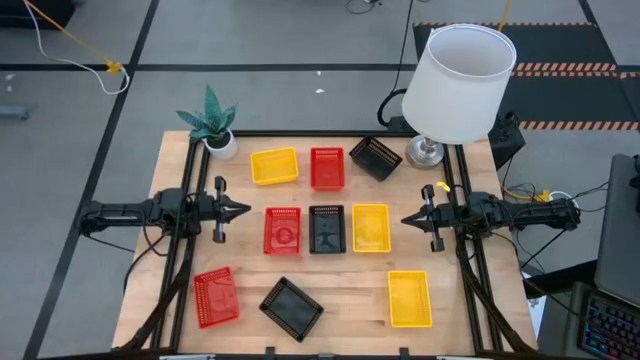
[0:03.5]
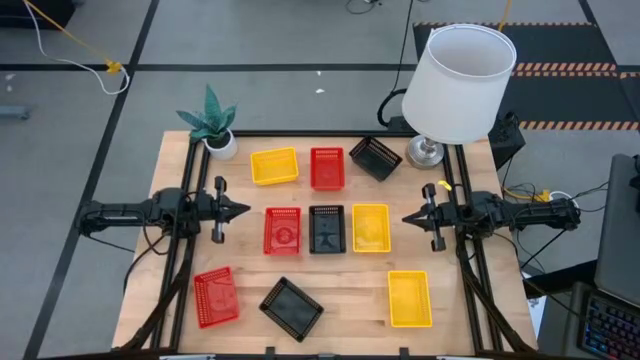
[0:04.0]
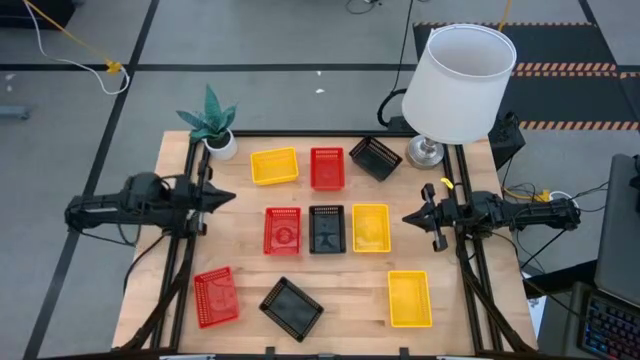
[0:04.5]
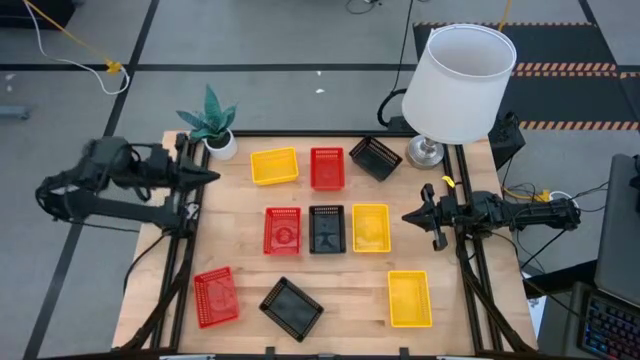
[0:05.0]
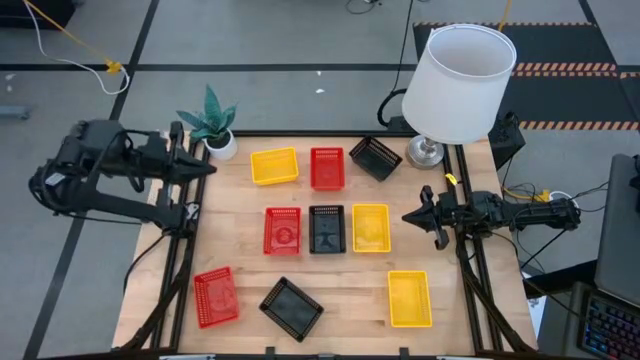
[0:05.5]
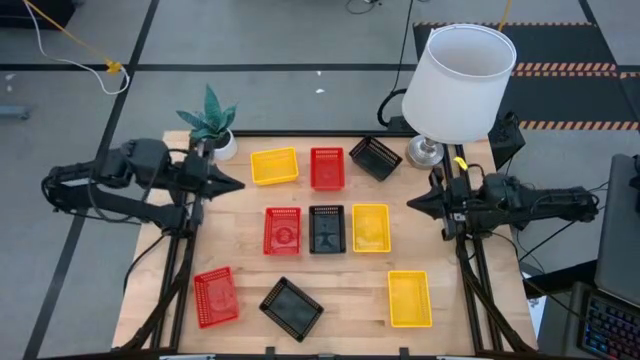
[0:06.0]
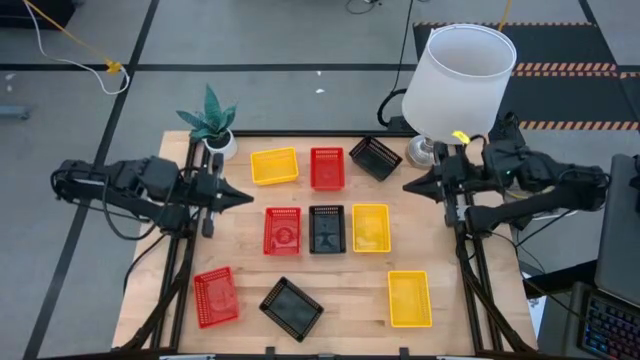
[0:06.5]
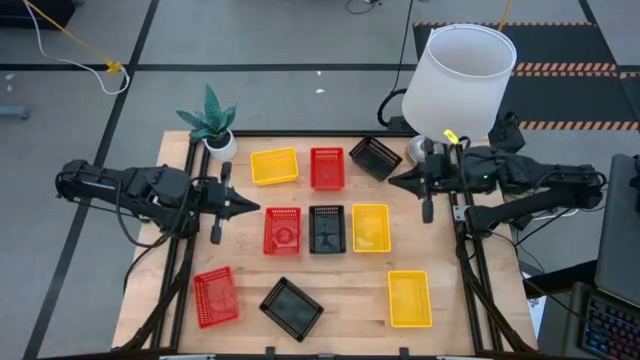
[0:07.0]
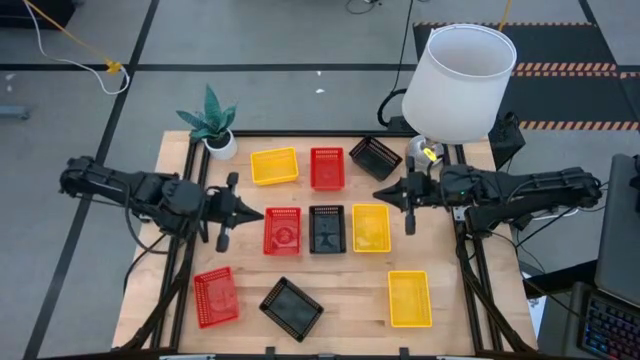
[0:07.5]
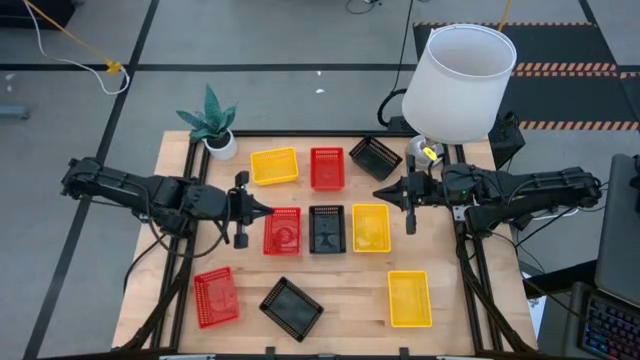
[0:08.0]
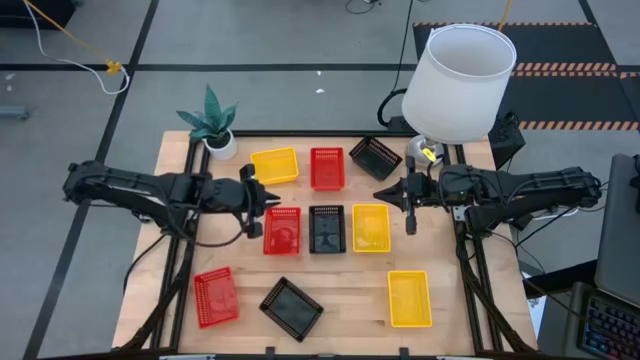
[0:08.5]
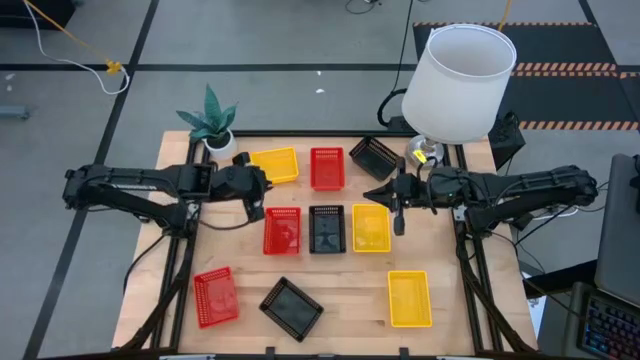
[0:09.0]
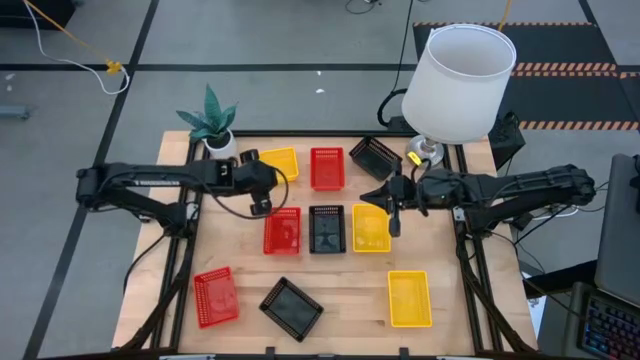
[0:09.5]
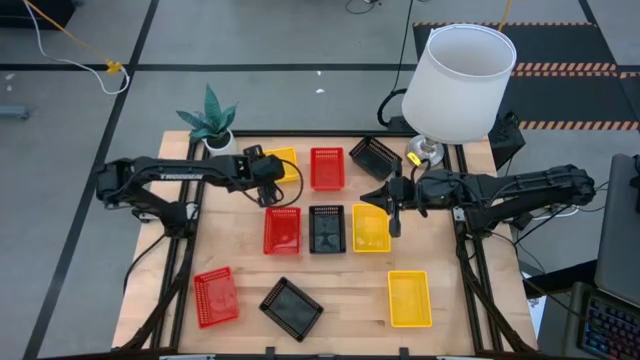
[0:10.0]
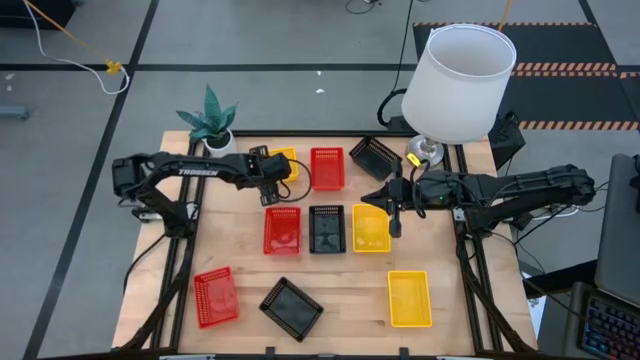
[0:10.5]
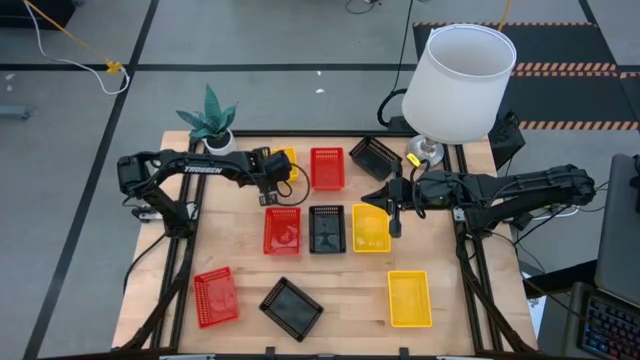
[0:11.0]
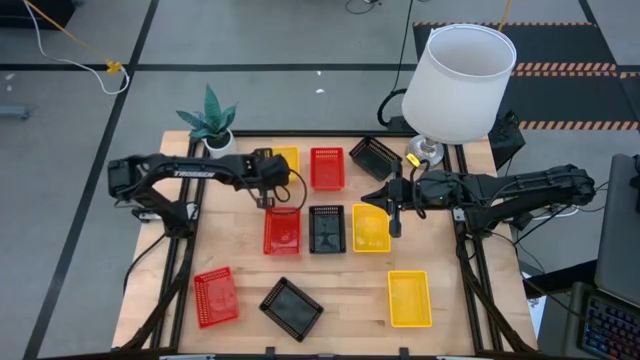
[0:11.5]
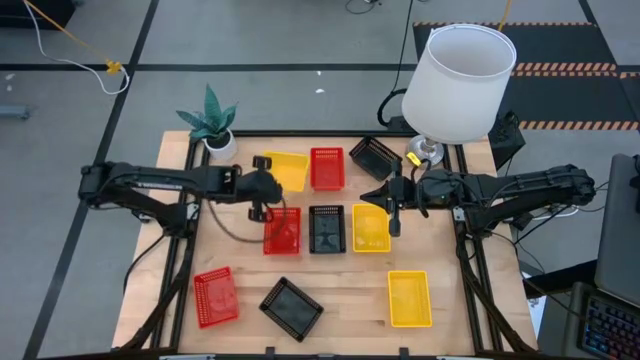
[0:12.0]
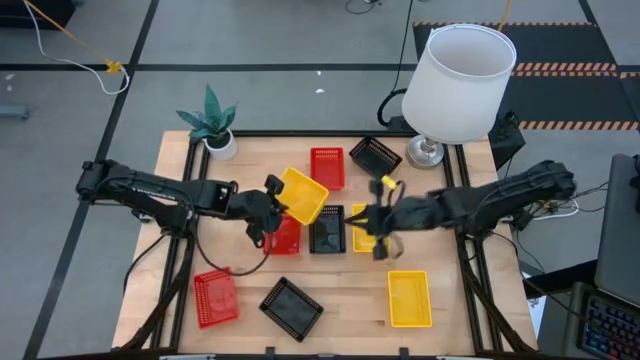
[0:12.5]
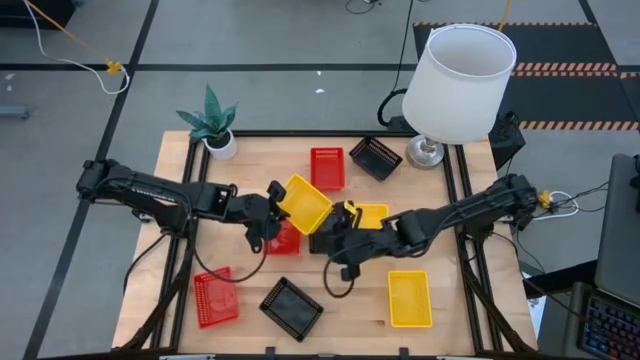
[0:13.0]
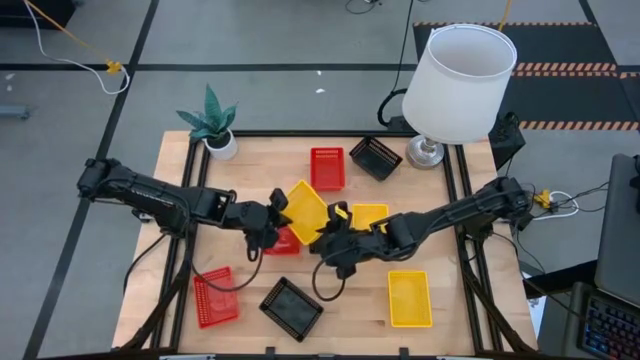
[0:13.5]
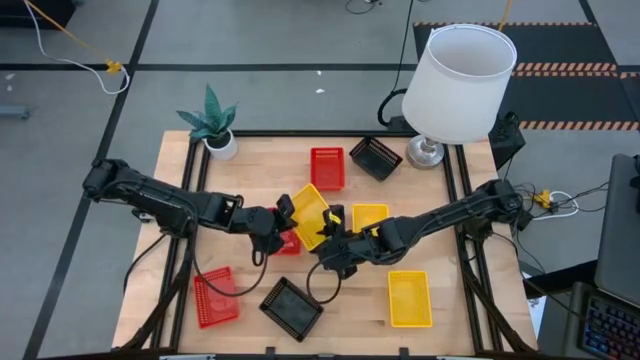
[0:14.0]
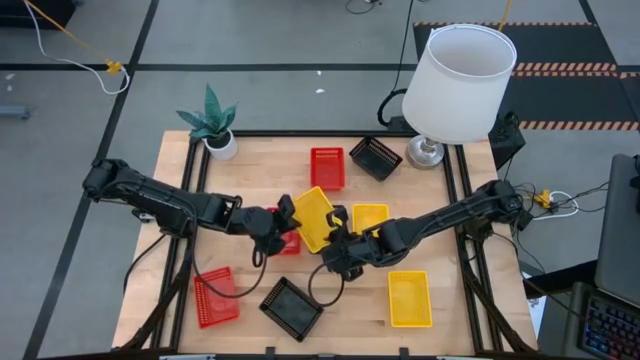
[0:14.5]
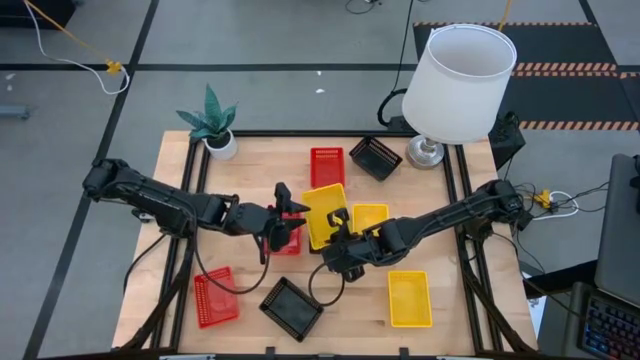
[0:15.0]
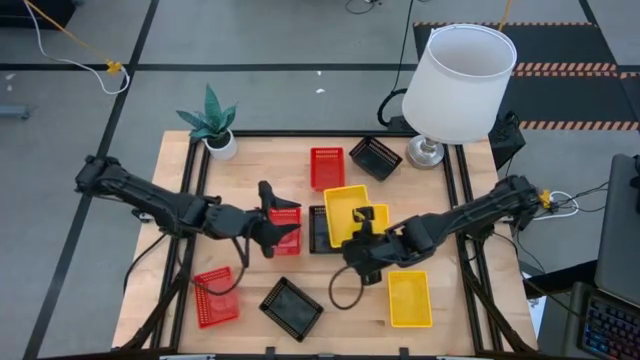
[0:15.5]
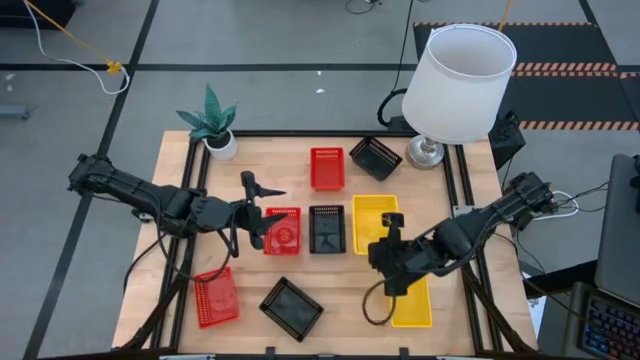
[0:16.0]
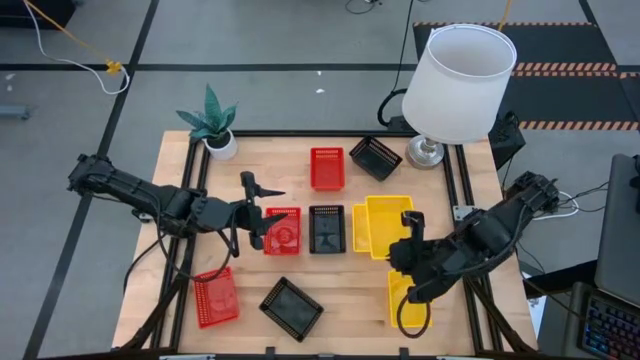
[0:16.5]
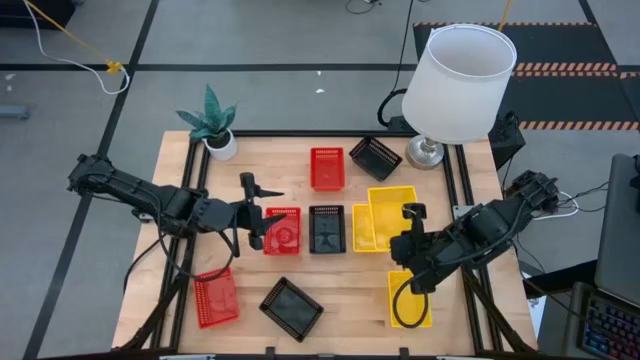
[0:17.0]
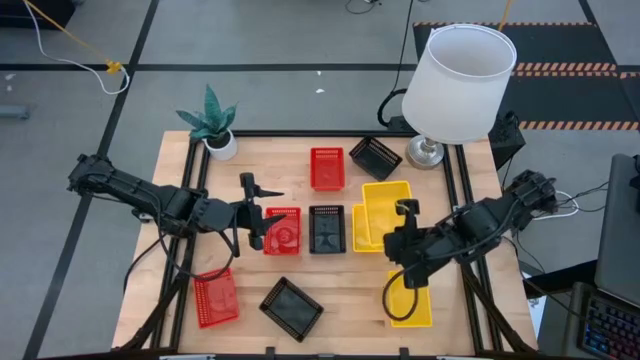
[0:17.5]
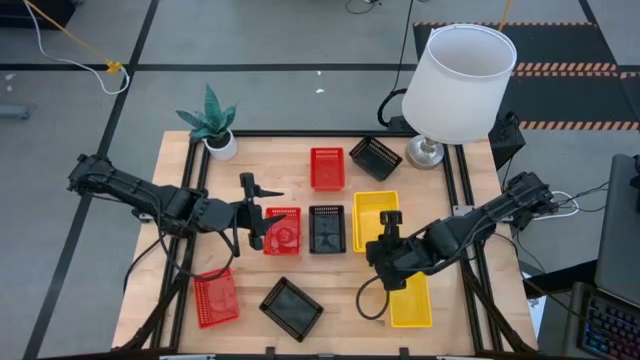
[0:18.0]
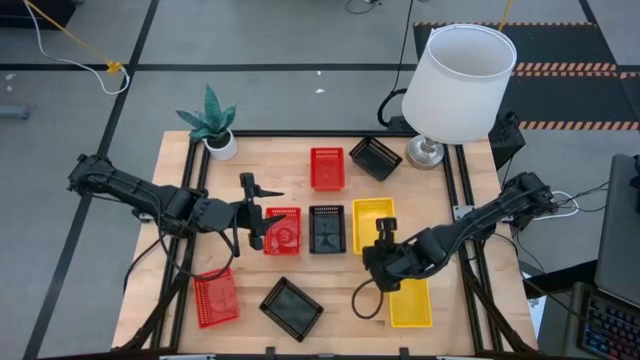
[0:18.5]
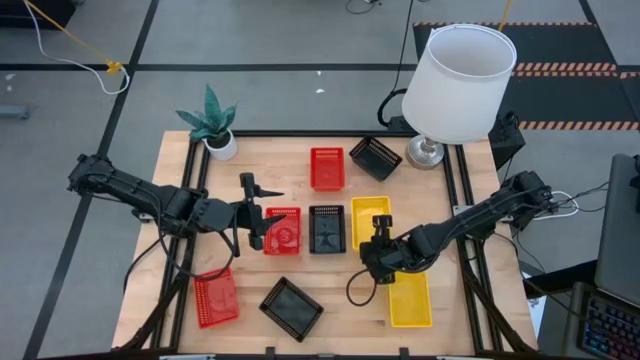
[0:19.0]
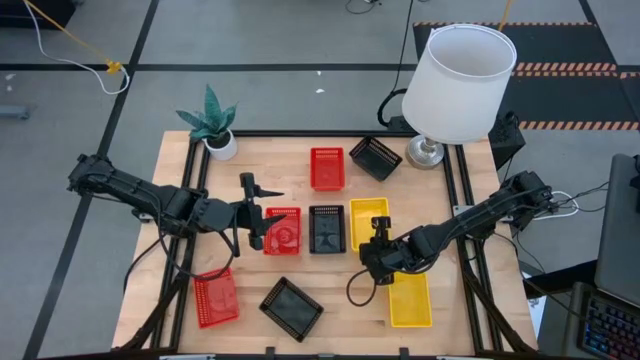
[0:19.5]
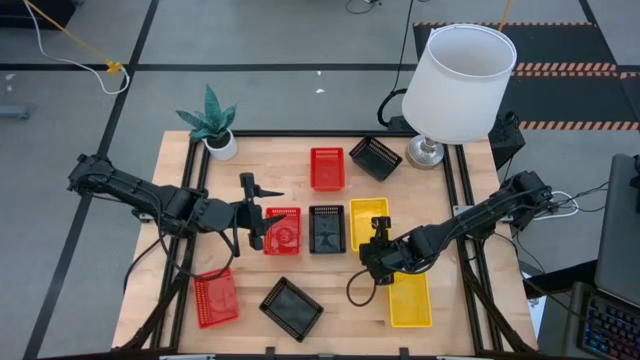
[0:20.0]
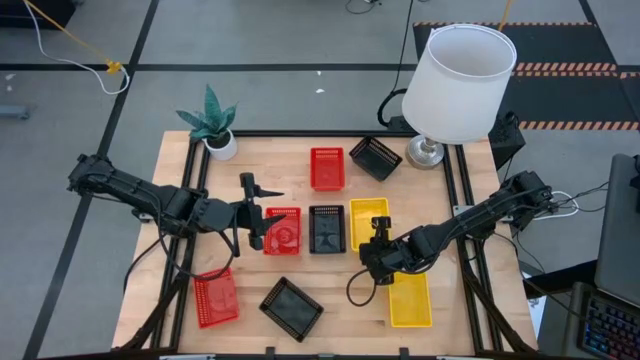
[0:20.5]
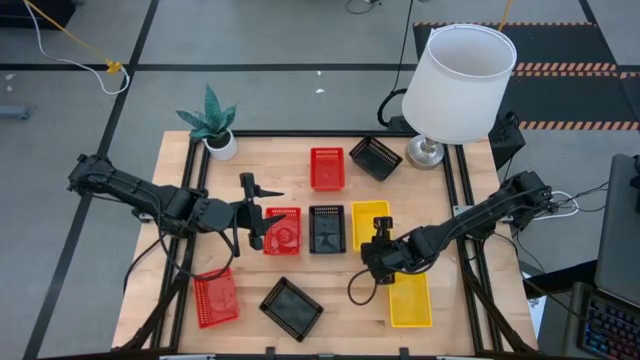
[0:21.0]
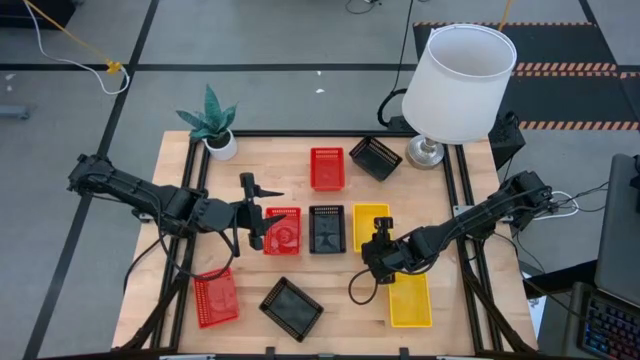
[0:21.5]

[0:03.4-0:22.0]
Stack the top yellow bin on top of the middle yellow bin
